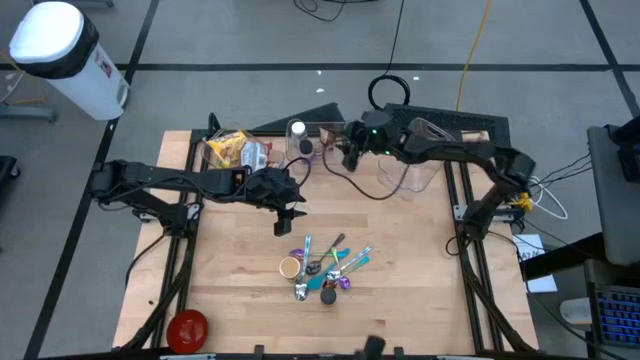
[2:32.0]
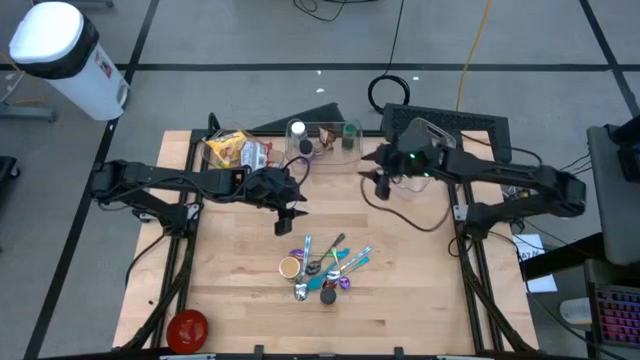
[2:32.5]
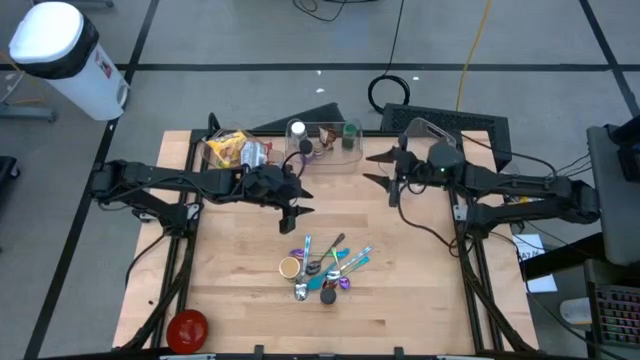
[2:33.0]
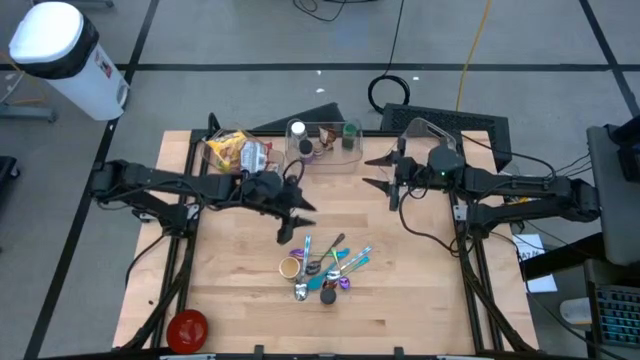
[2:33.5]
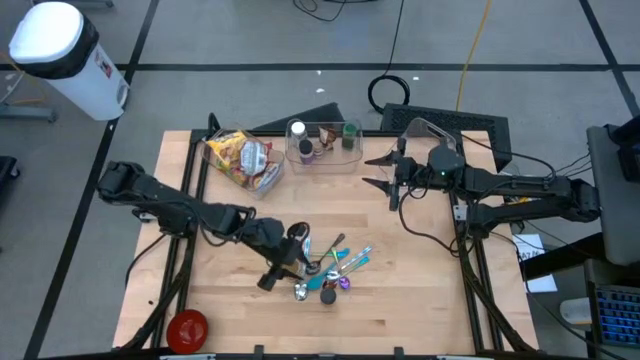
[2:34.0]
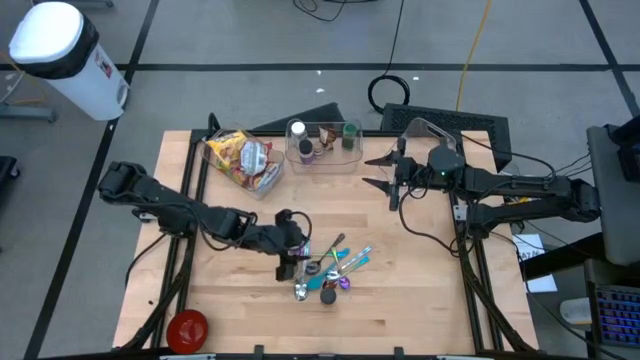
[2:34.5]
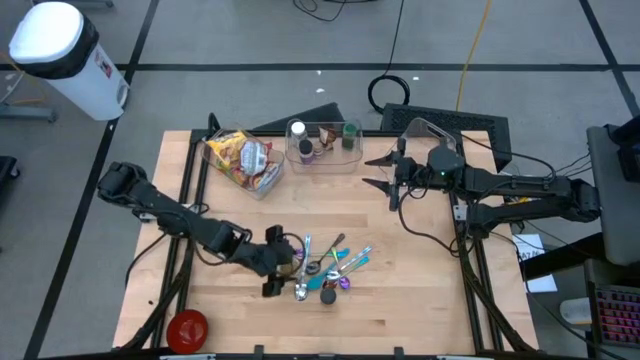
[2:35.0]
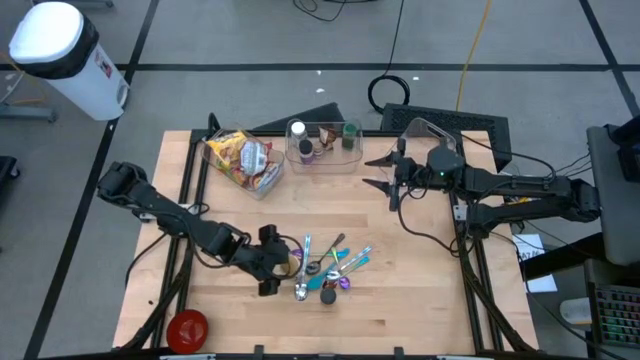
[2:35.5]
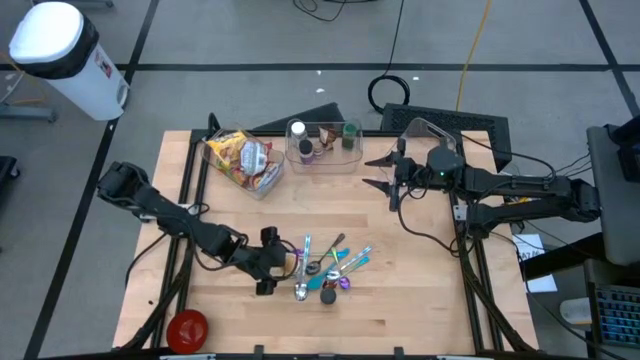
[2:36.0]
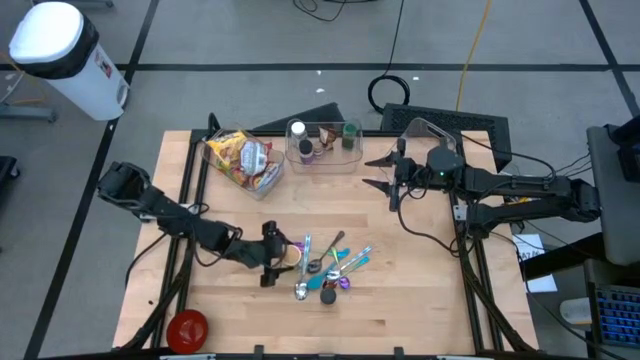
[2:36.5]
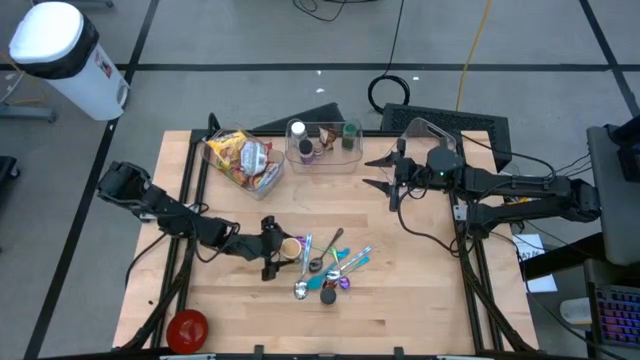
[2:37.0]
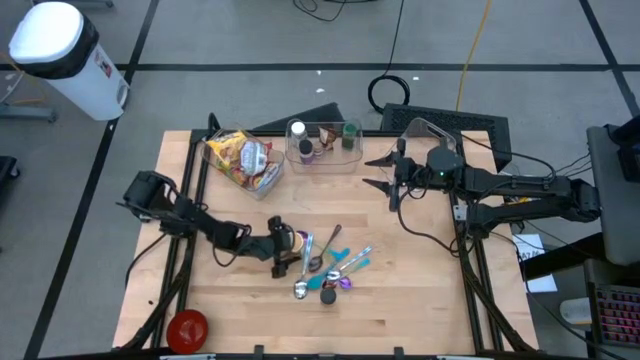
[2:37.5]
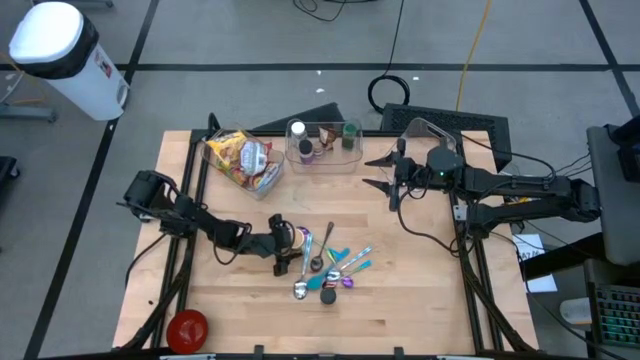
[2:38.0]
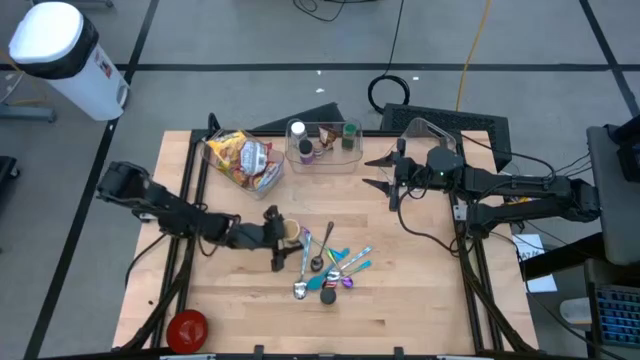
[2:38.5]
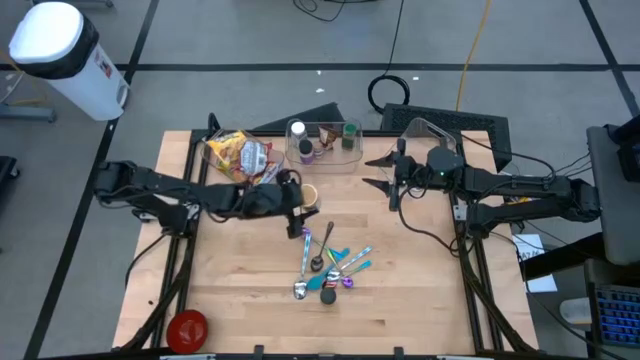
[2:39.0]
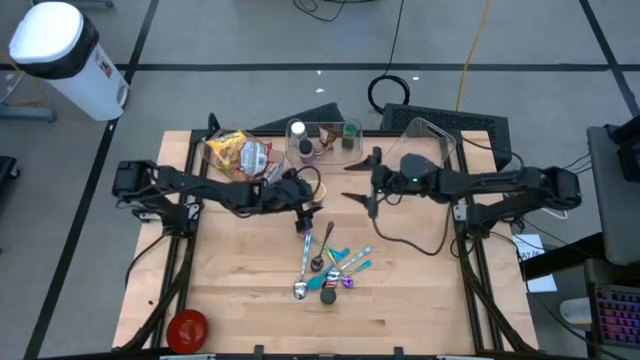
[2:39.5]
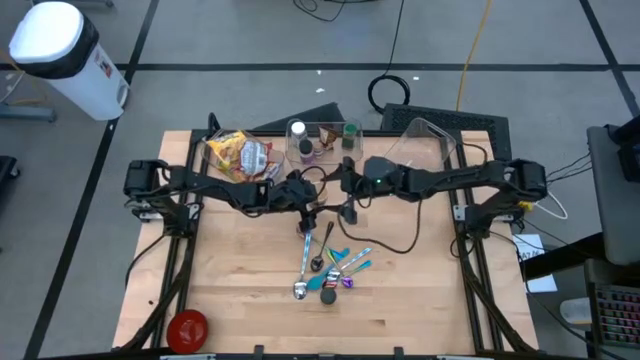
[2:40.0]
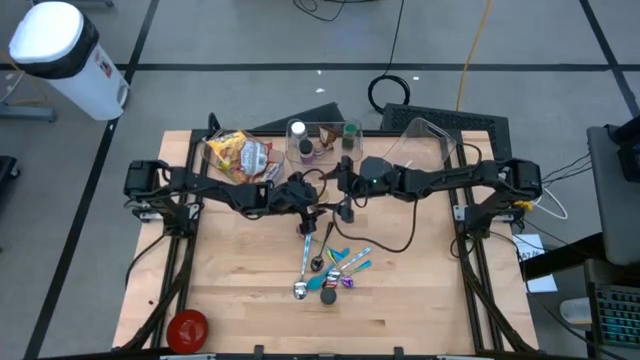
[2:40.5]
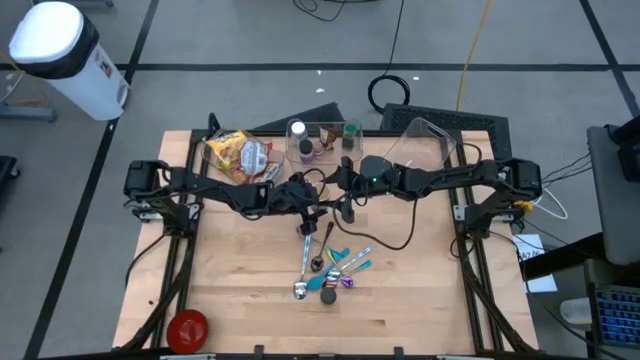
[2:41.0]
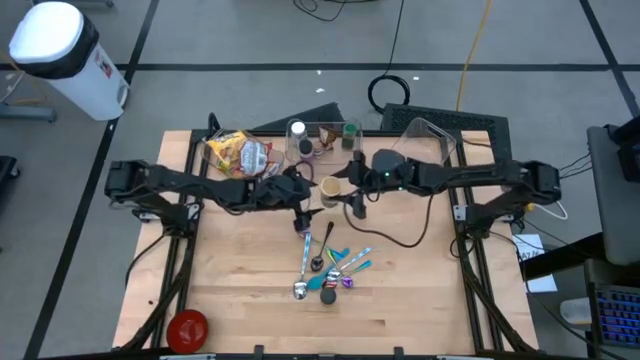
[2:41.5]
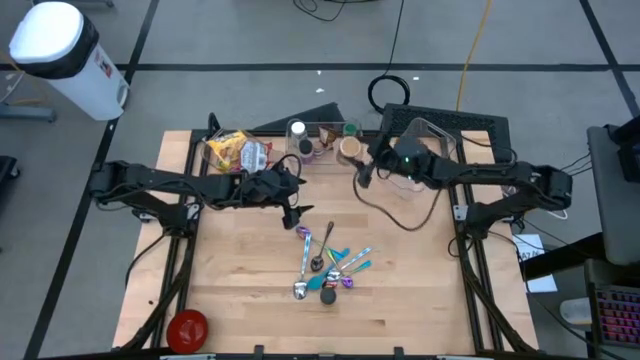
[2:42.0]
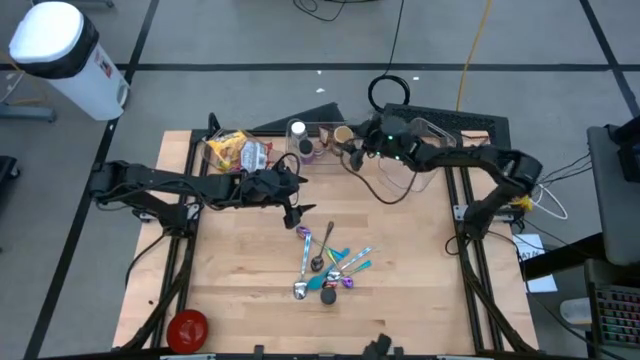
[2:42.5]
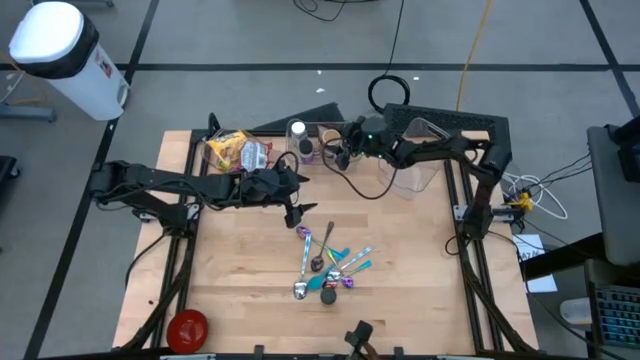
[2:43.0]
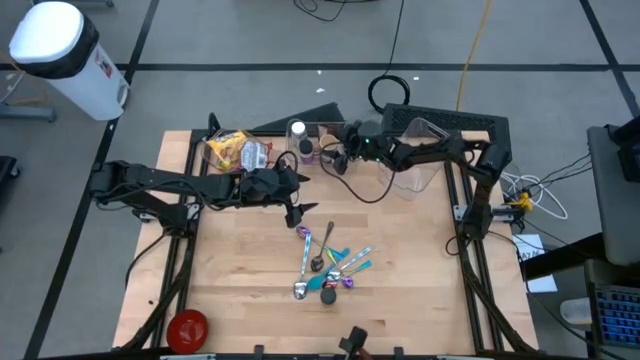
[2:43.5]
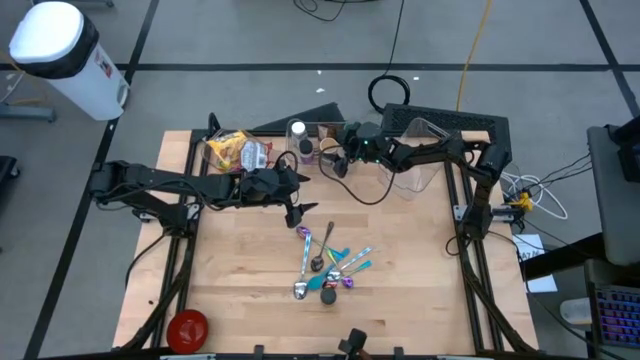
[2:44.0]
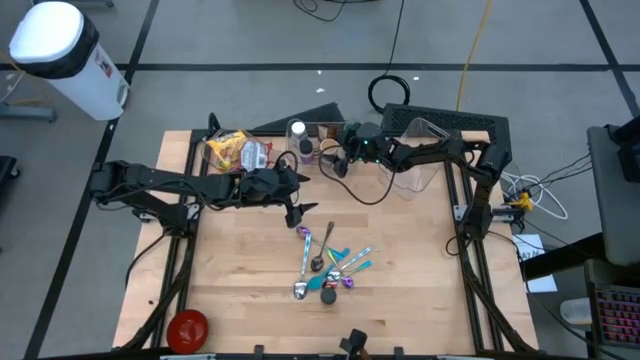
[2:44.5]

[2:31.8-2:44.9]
Task: Pick & Place Food Item
Put the golden seasoning bottle into the middle transparent bin

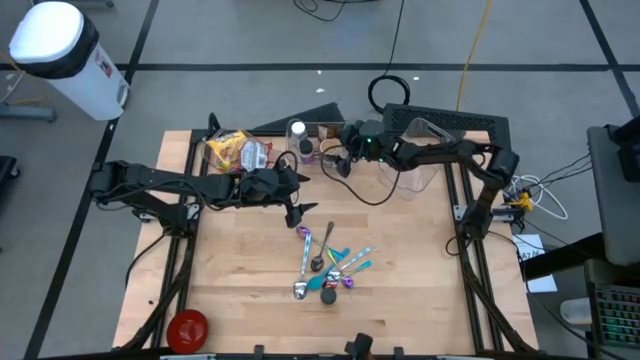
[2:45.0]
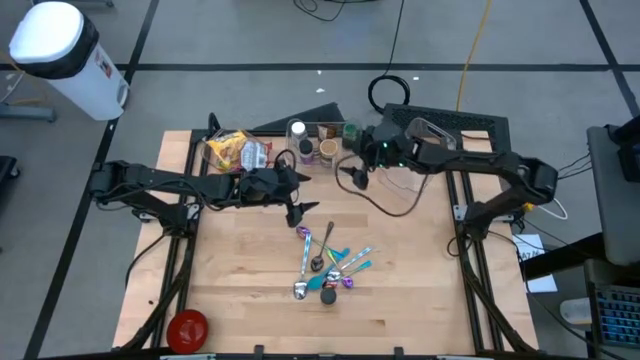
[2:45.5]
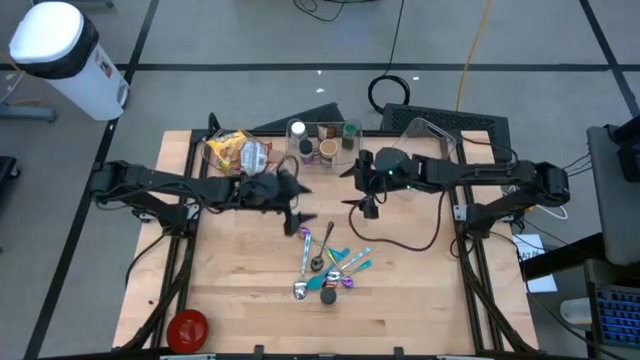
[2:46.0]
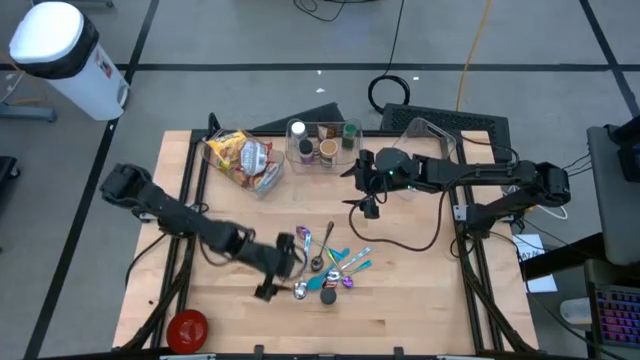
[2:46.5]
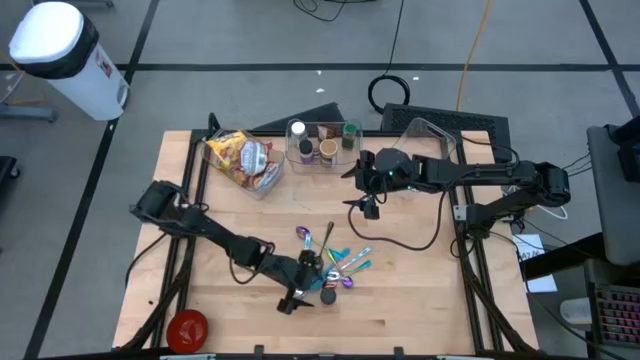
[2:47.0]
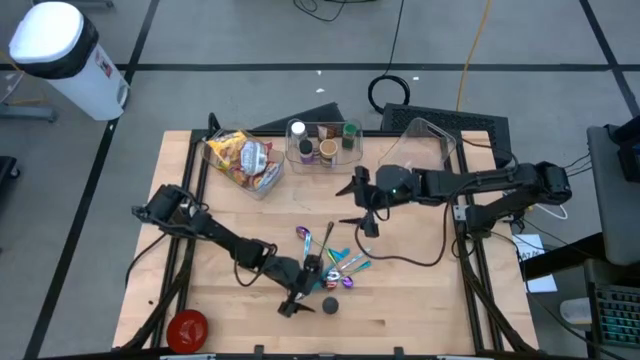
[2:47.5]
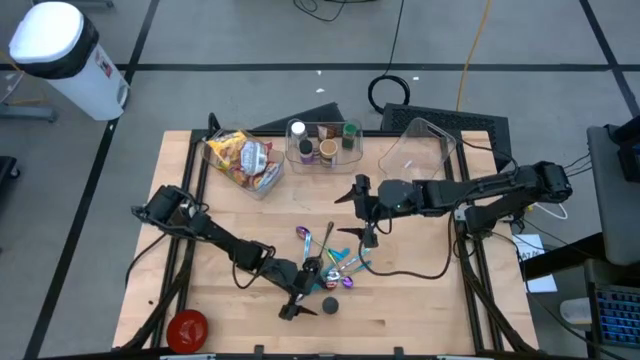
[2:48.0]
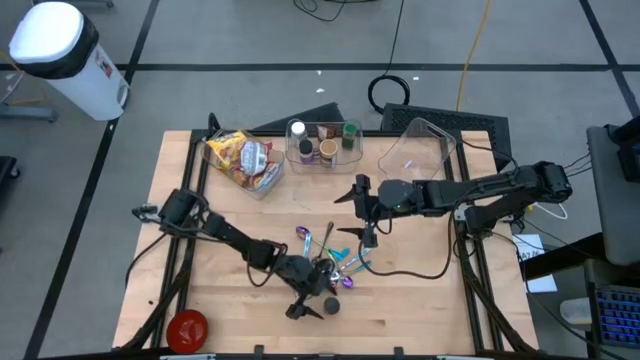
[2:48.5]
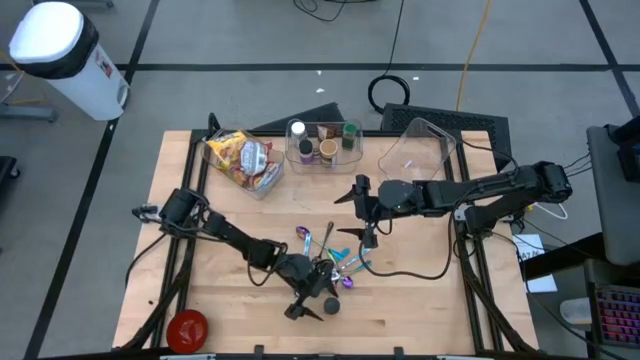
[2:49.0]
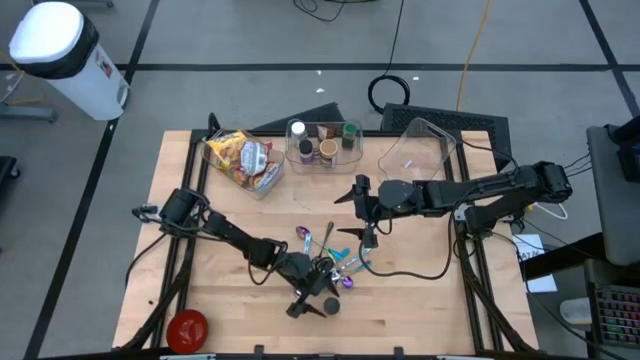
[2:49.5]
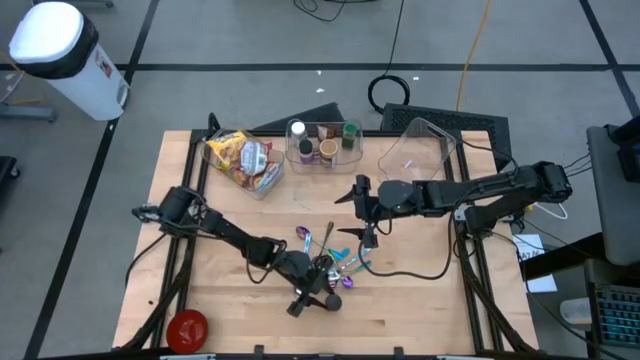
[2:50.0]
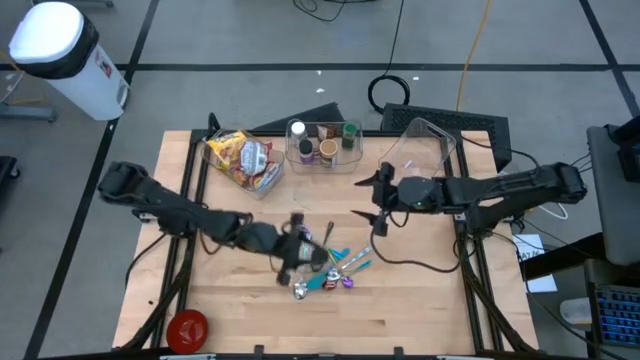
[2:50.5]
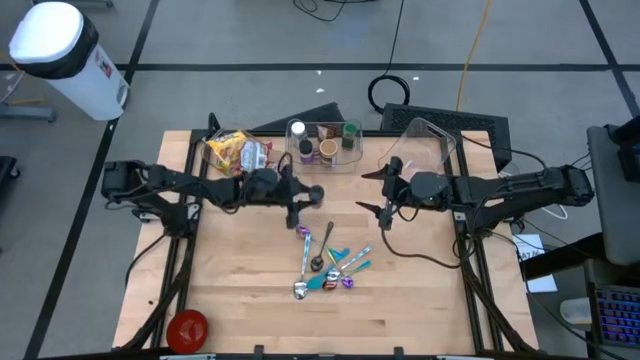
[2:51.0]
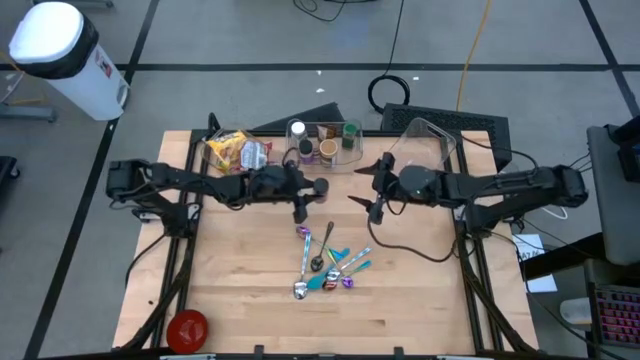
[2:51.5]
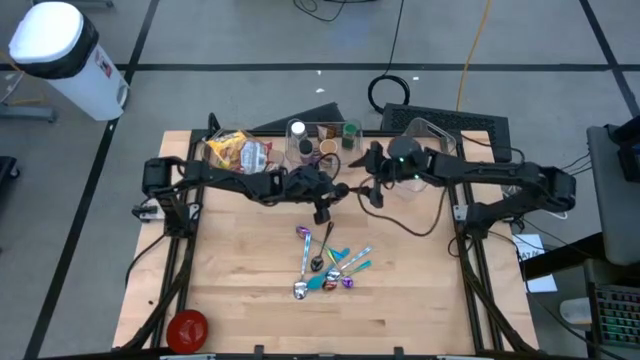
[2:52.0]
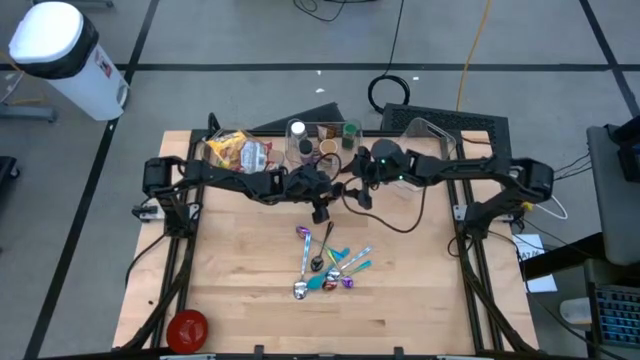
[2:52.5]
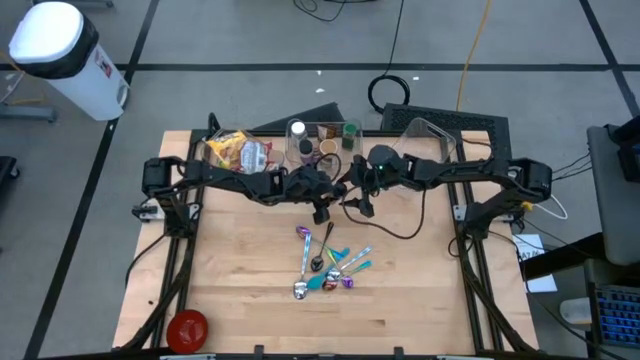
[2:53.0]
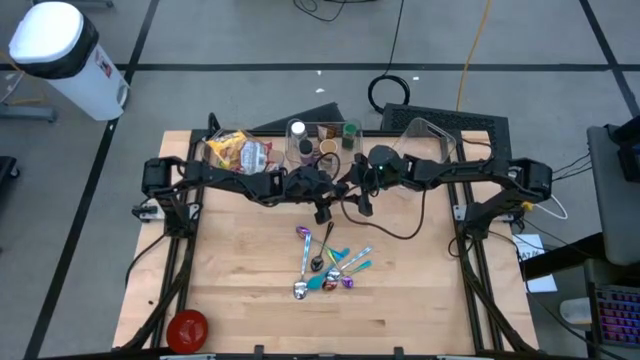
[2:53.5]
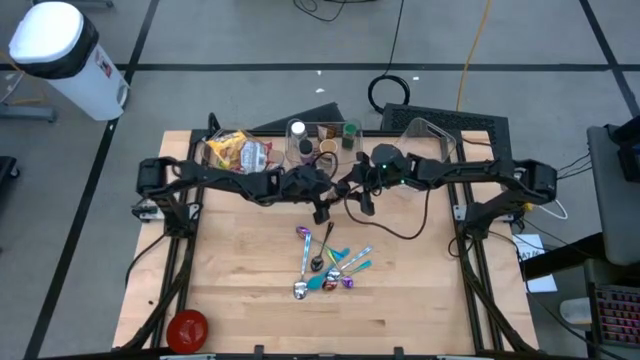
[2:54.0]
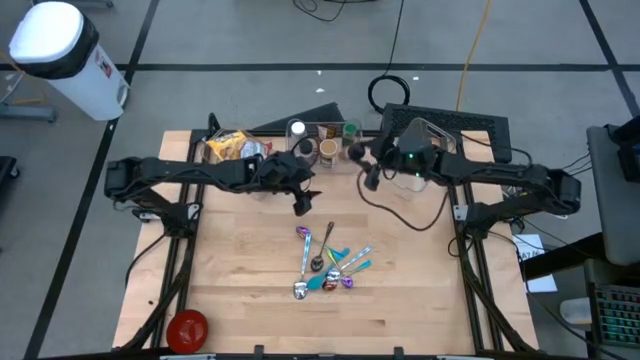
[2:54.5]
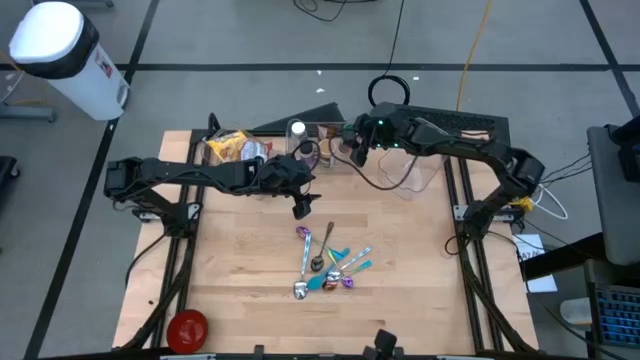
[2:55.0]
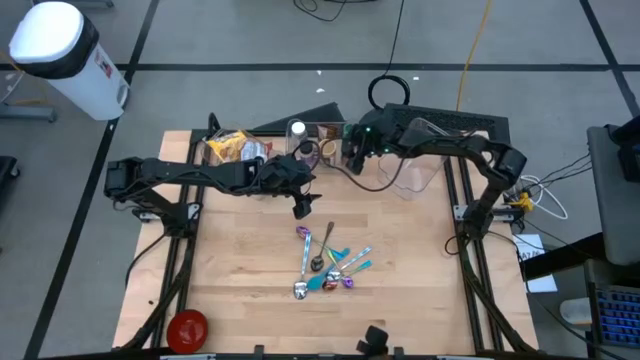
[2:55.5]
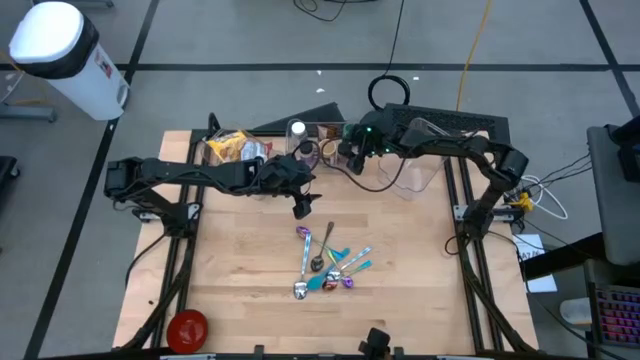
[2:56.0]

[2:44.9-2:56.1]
Put the orange seasoning bottle into the middle transparent bin
